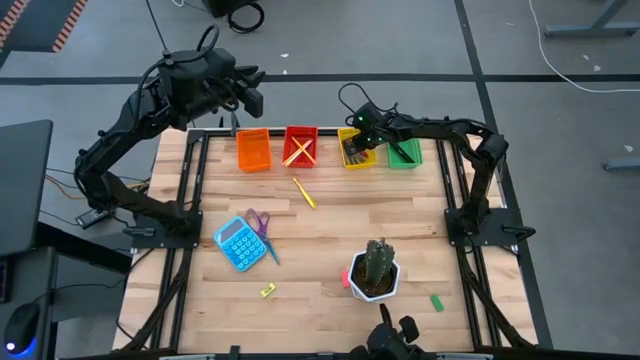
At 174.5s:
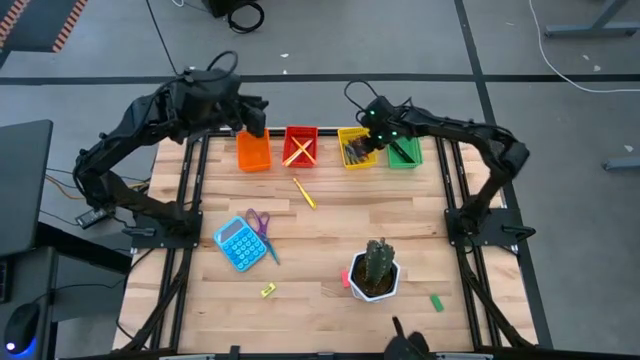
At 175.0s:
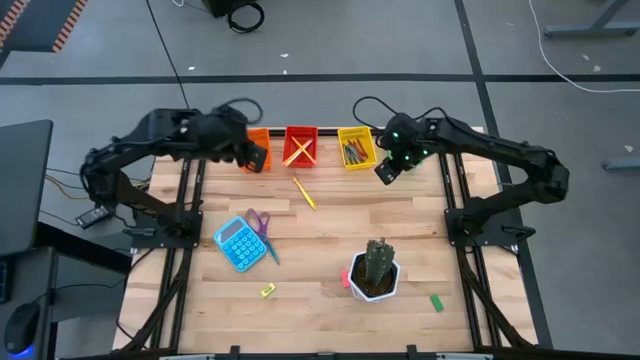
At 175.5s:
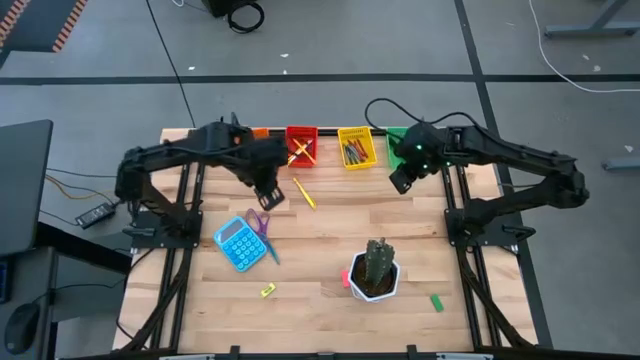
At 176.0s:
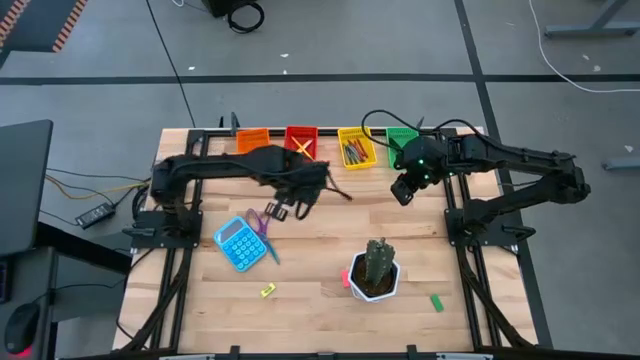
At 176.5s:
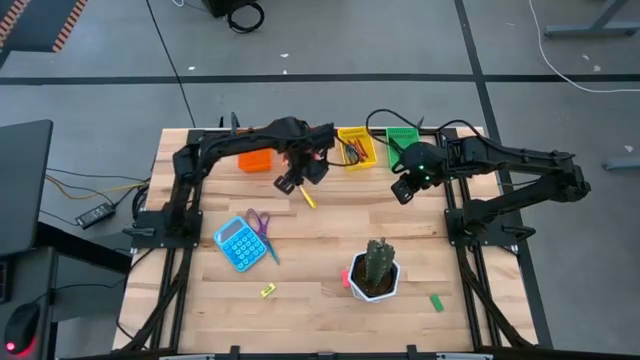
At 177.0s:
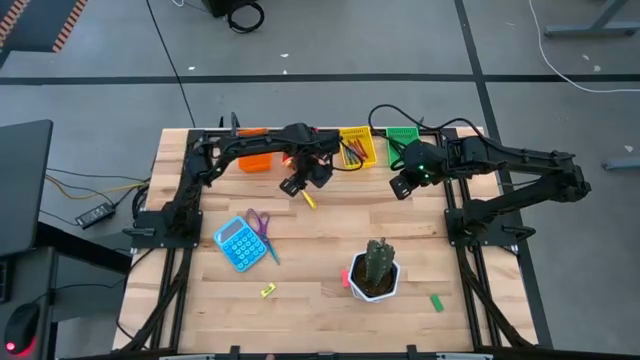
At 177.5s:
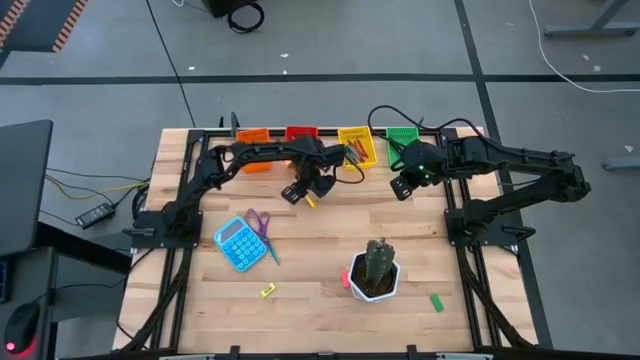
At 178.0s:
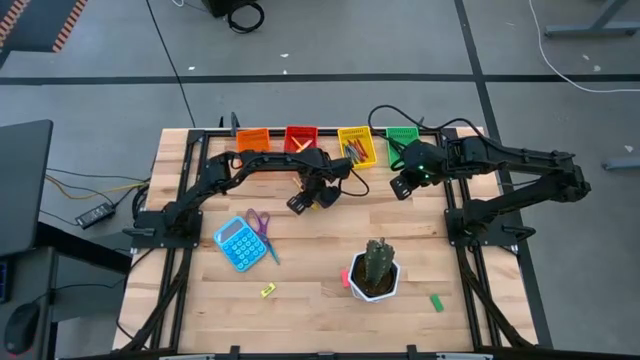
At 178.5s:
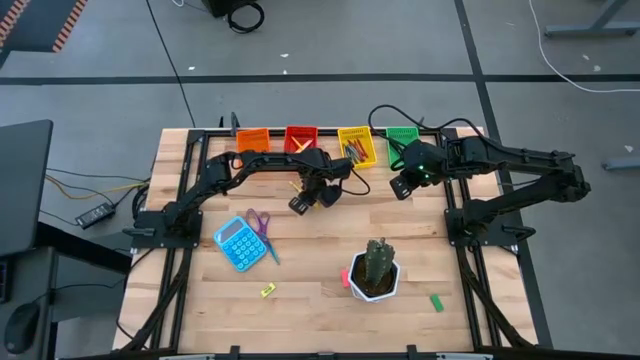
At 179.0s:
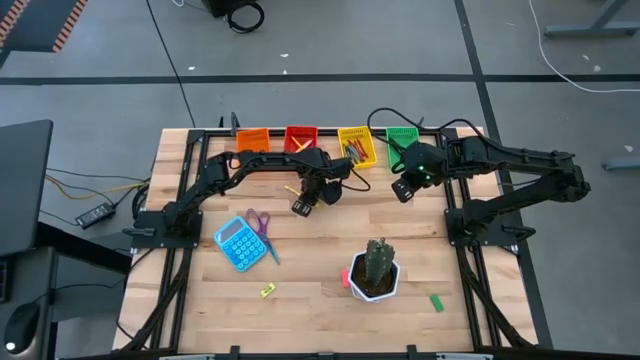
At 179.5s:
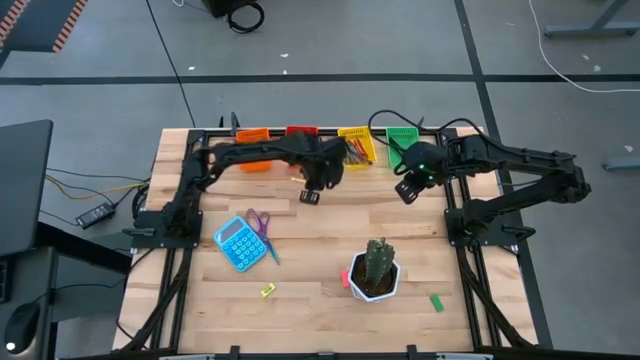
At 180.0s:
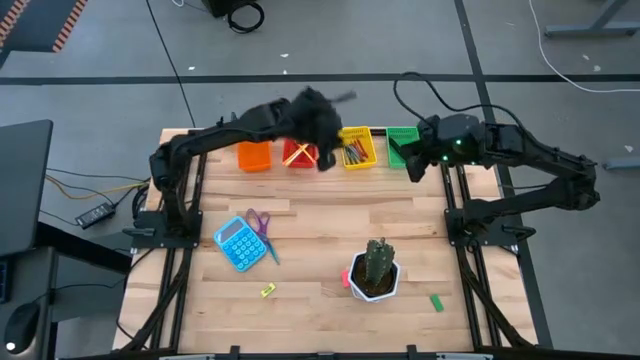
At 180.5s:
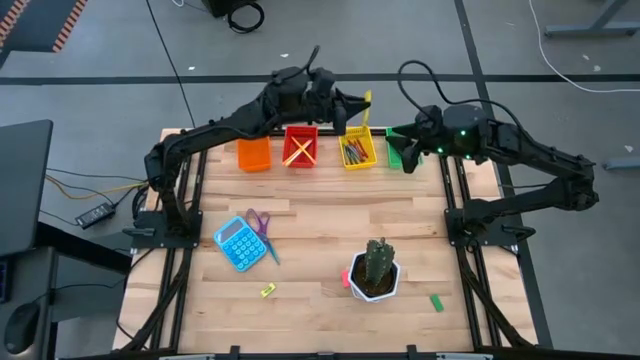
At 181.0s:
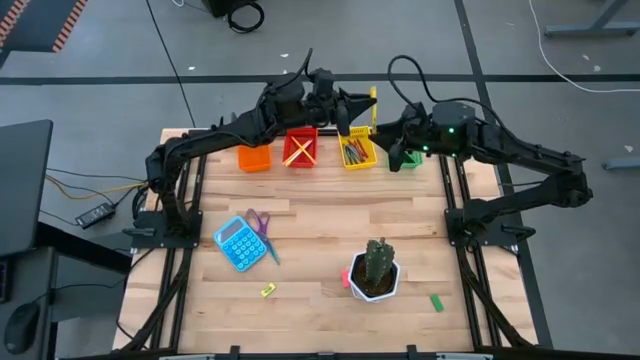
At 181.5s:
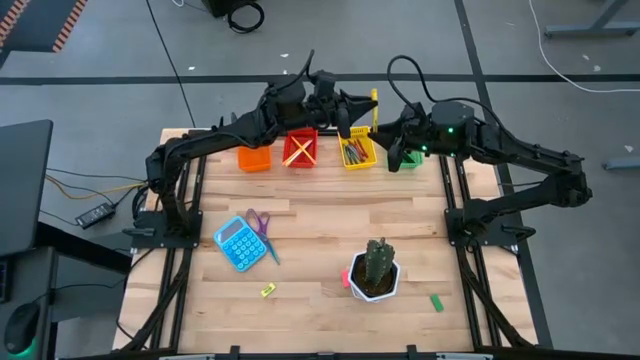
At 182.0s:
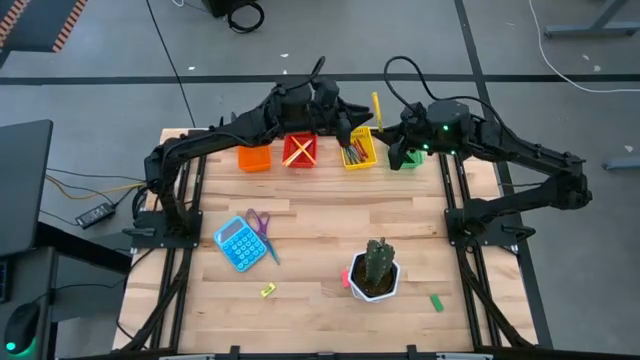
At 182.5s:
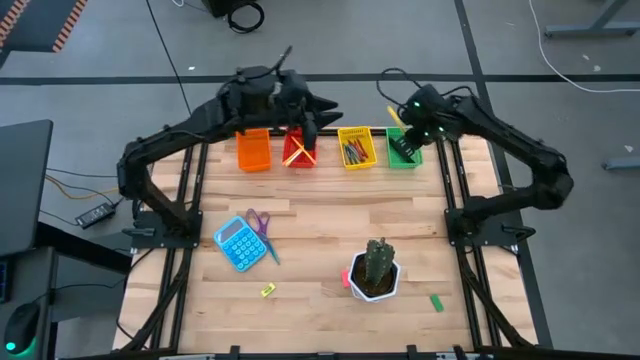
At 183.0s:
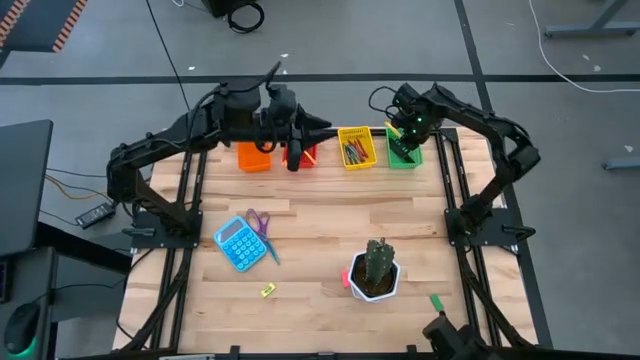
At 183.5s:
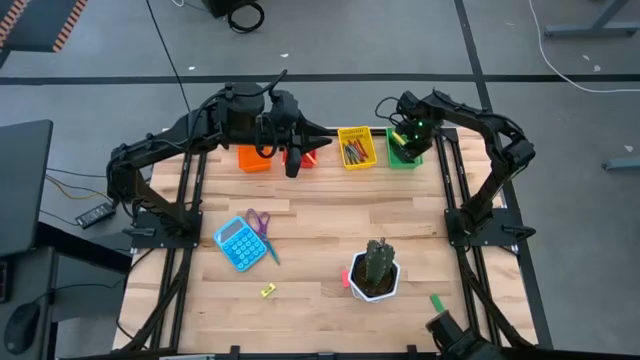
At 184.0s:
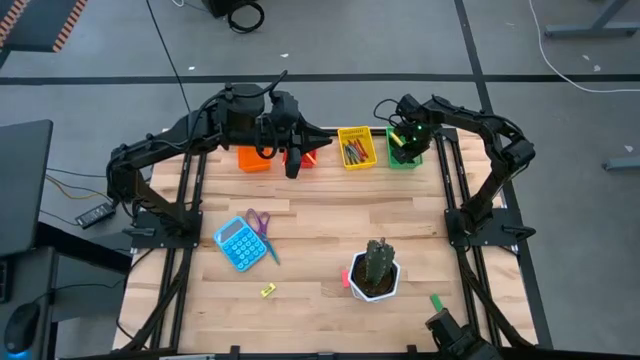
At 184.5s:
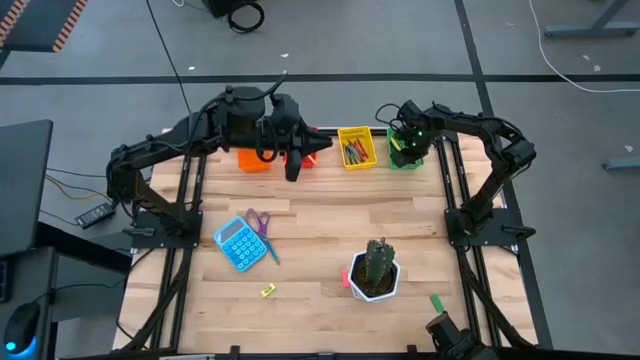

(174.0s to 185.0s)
Task: Sort crayons/erasers/pens/pencils in bins
Put the yellow pen into the green bin

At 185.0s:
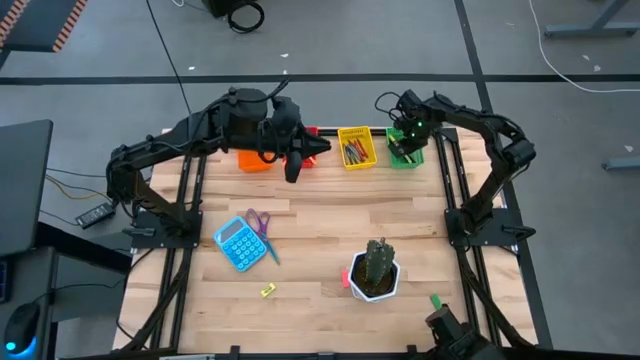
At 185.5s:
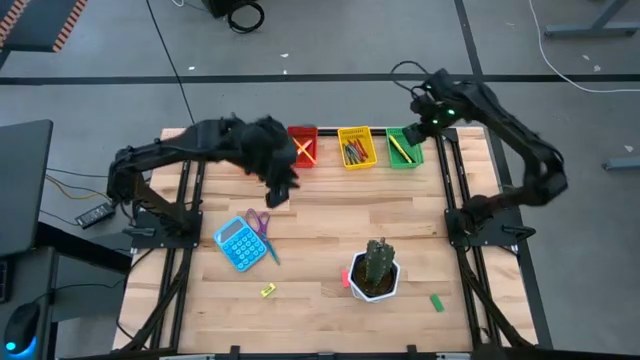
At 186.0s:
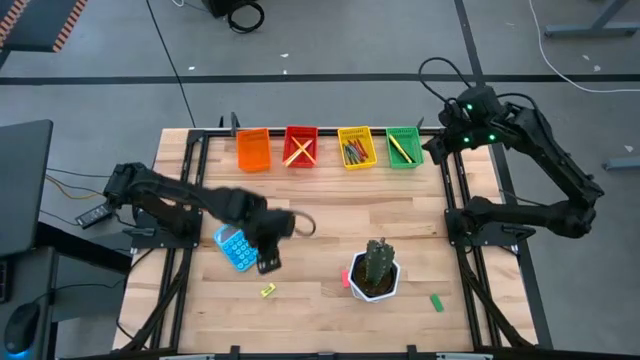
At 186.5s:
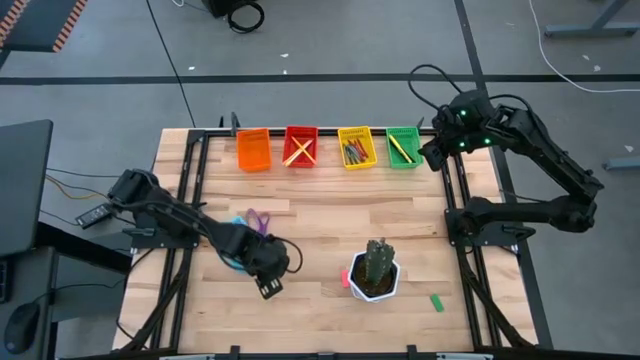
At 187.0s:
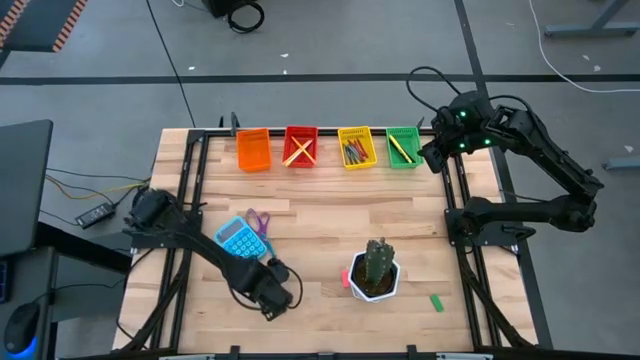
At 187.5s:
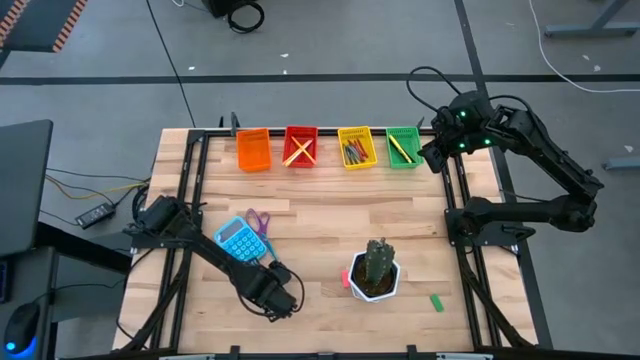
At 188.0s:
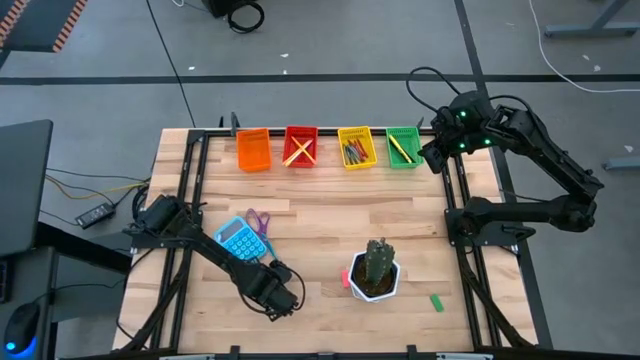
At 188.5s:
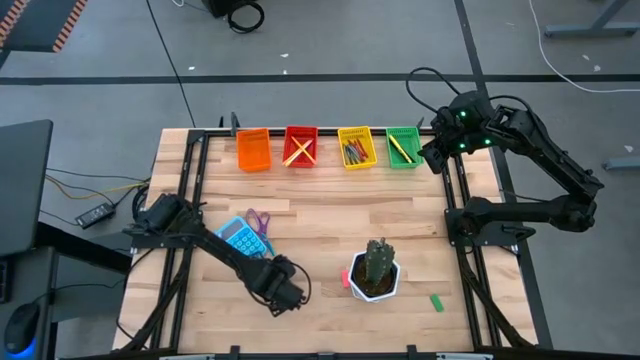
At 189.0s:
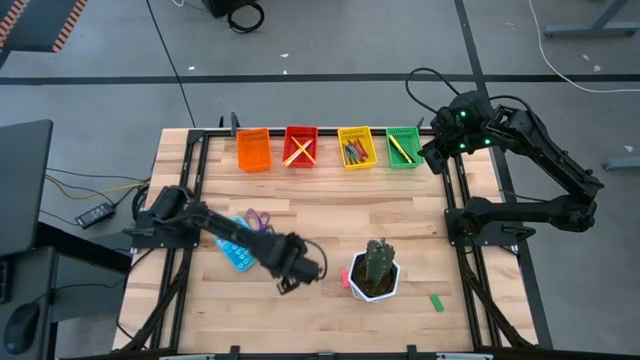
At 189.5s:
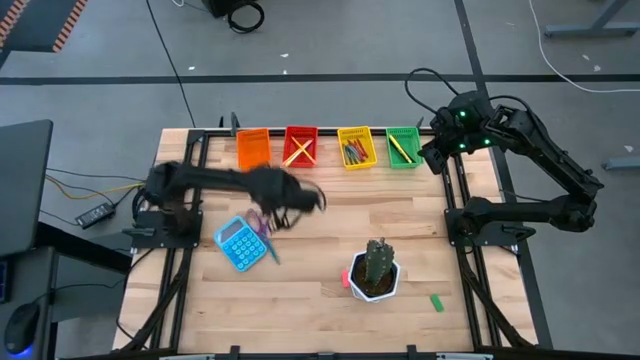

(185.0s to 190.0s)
Put the yellow eraser into the orange bin

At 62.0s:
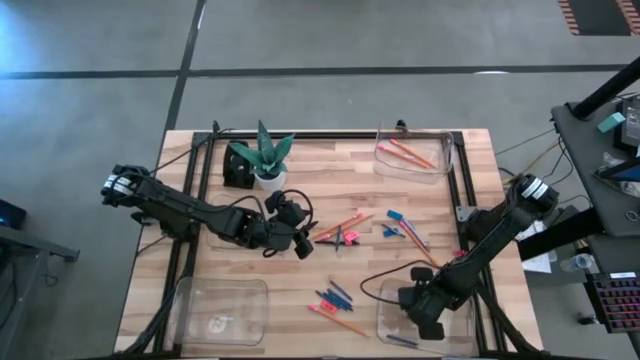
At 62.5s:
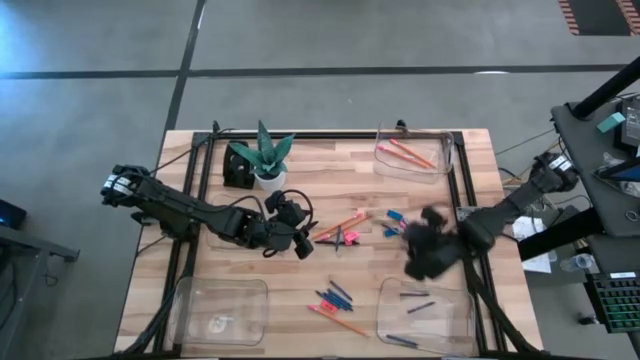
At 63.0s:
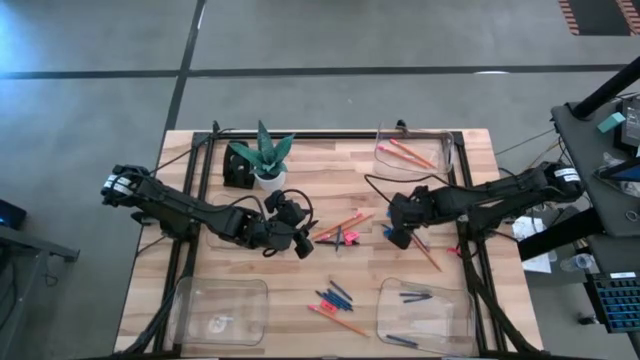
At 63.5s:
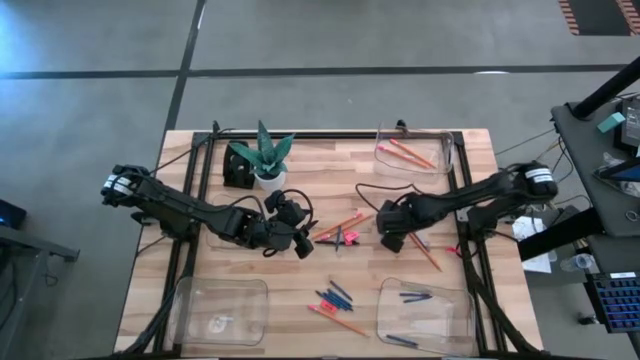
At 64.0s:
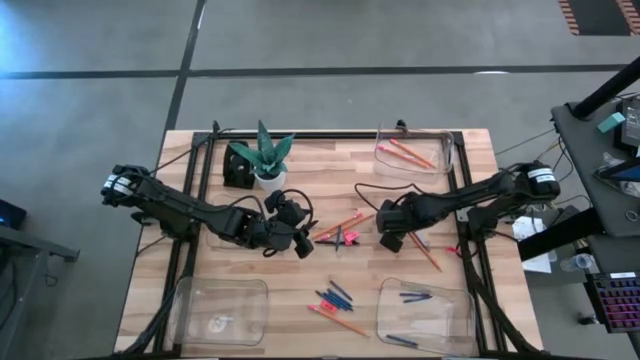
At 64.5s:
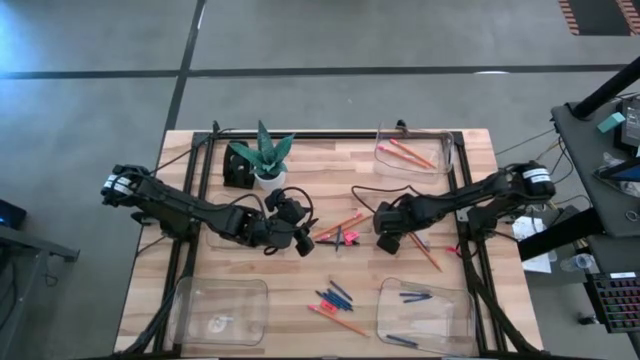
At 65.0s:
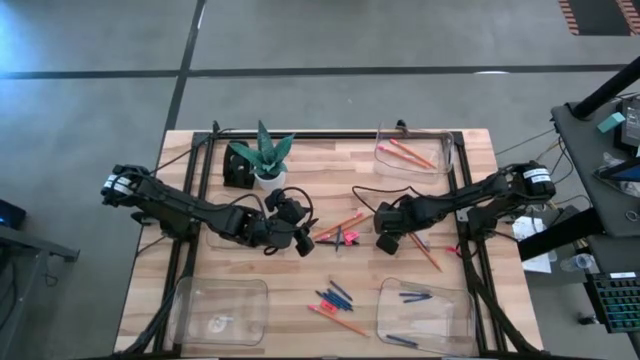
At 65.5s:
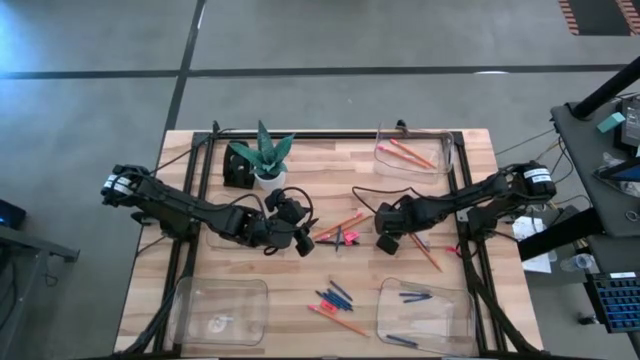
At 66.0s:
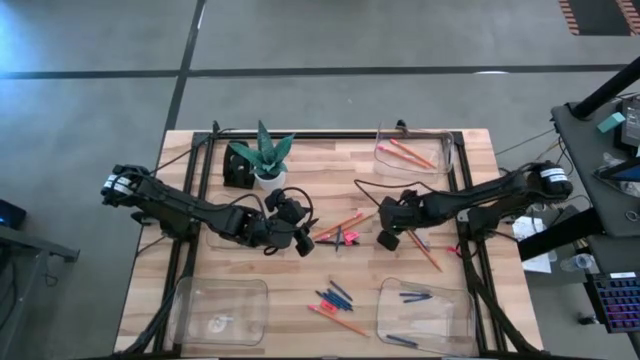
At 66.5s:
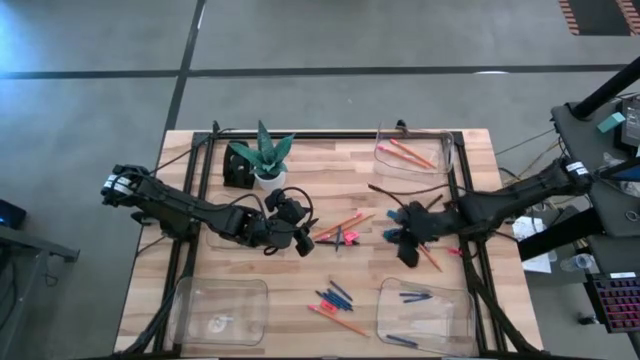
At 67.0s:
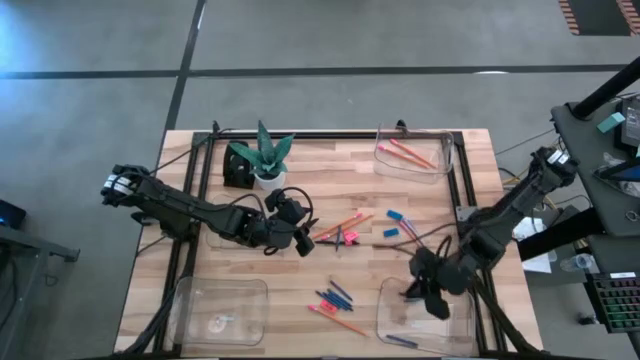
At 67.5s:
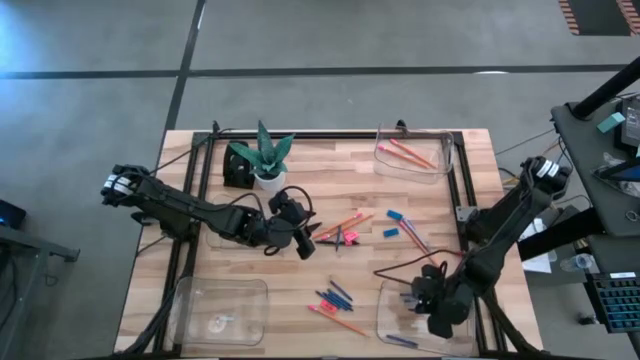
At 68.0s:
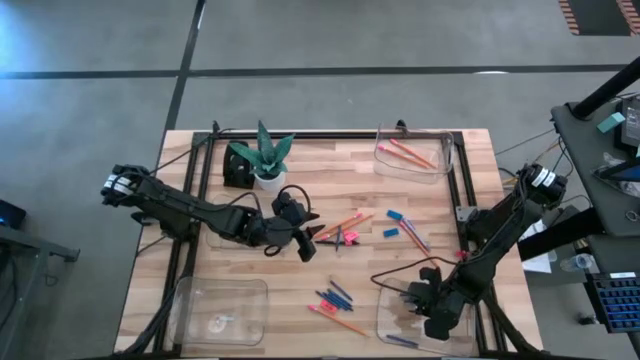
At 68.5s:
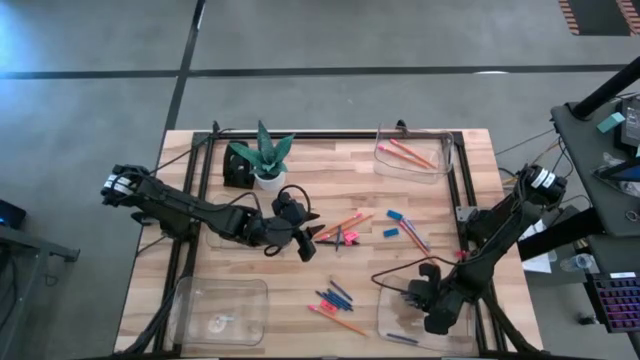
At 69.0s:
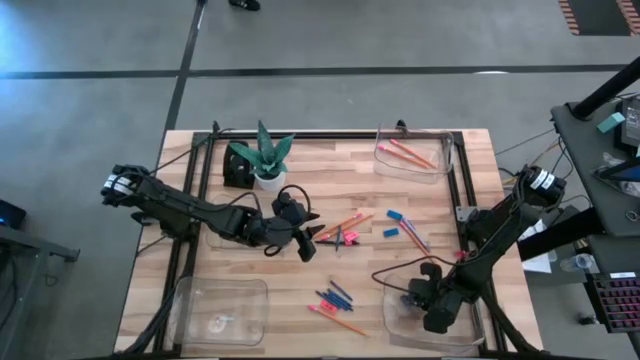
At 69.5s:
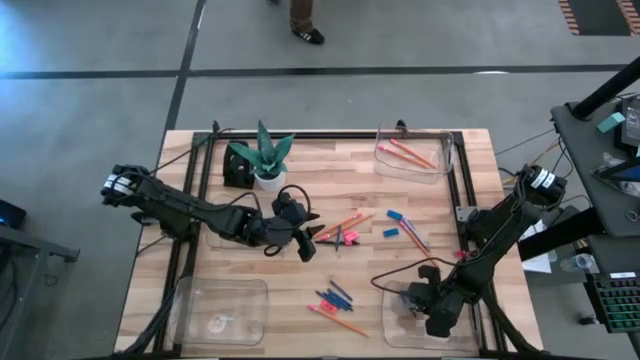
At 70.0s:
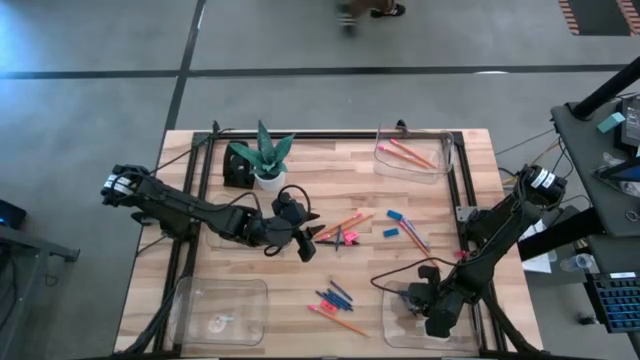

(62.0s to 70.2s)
Task: Sort crayons/erasers/pens/pencils in bins
Put the blue crayon into the bottom right transparent bin
